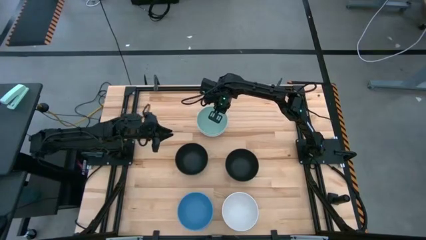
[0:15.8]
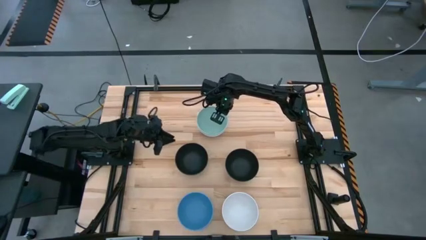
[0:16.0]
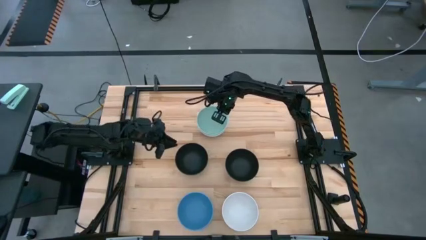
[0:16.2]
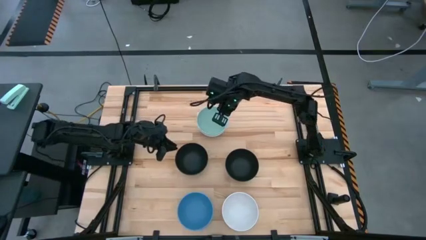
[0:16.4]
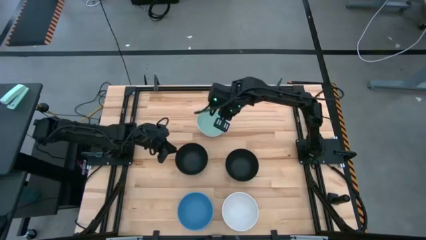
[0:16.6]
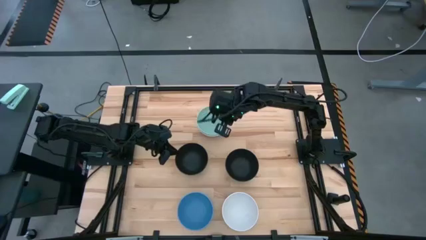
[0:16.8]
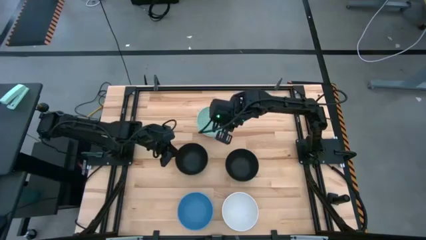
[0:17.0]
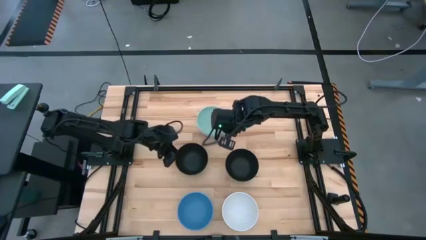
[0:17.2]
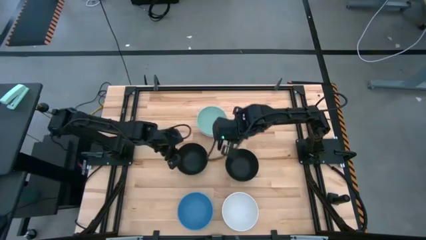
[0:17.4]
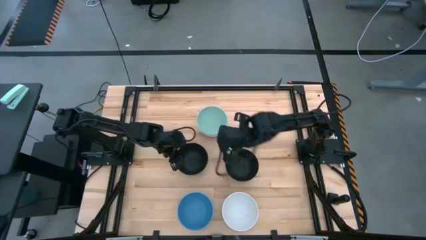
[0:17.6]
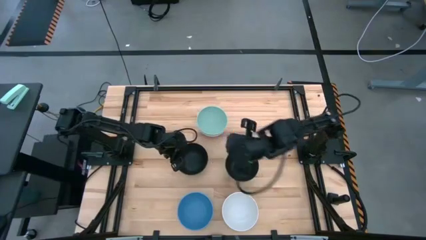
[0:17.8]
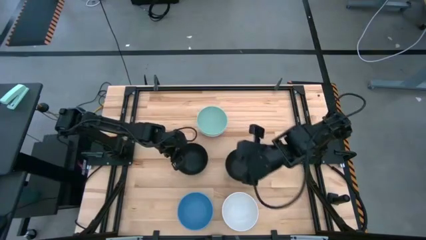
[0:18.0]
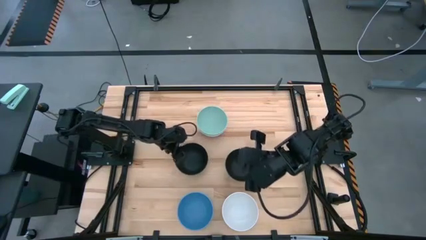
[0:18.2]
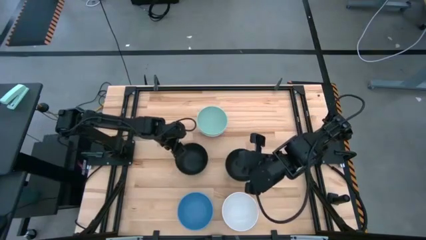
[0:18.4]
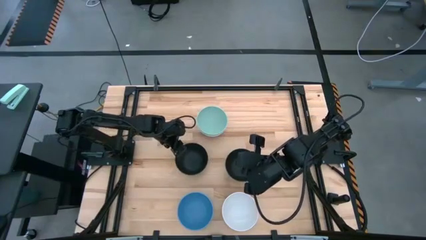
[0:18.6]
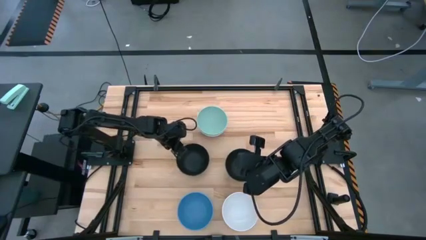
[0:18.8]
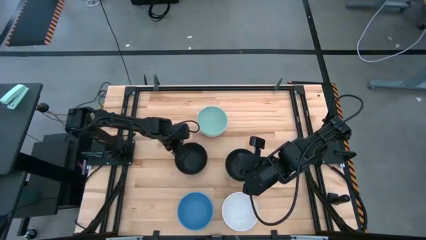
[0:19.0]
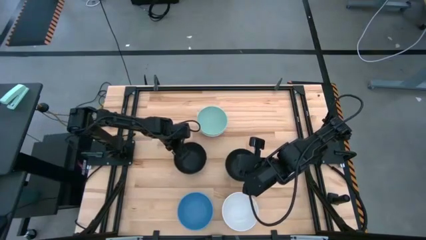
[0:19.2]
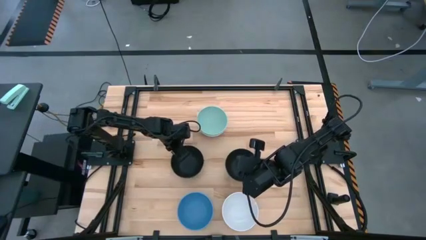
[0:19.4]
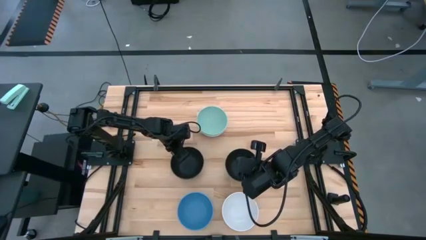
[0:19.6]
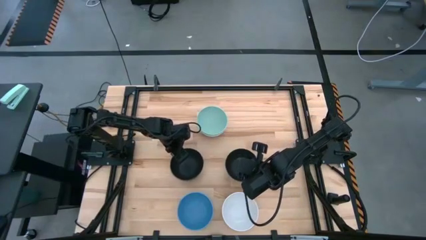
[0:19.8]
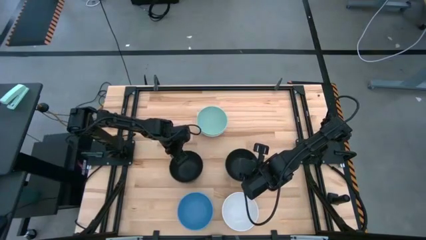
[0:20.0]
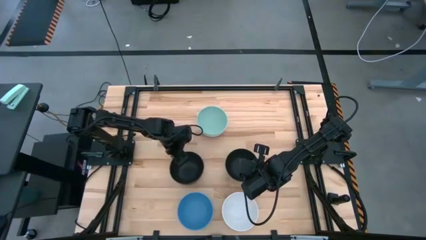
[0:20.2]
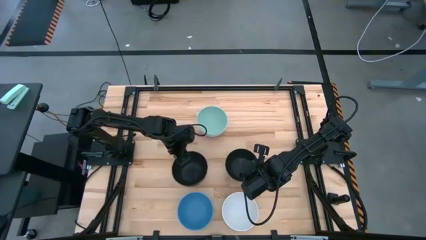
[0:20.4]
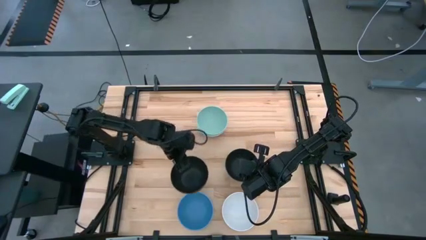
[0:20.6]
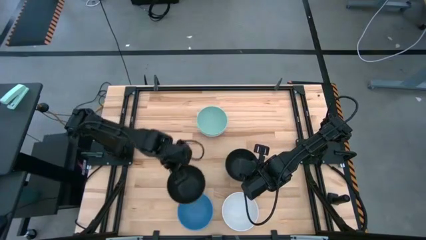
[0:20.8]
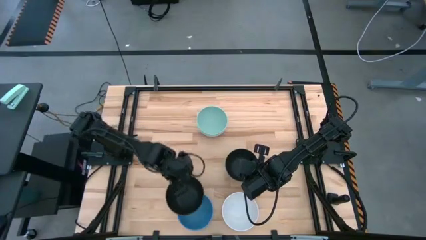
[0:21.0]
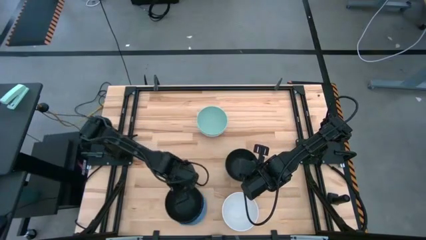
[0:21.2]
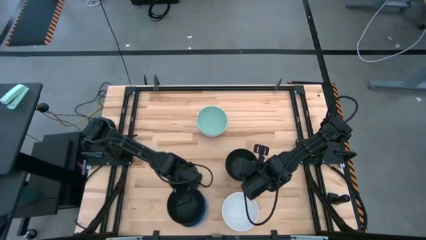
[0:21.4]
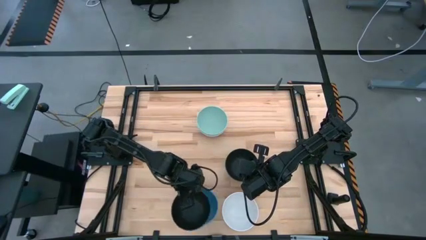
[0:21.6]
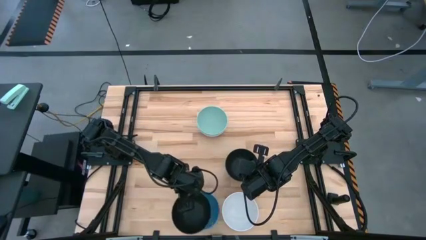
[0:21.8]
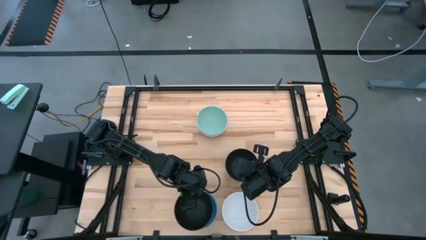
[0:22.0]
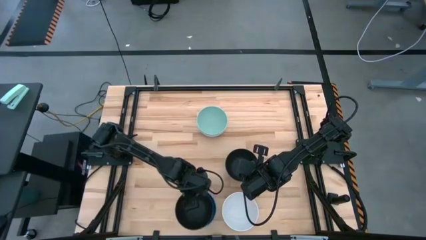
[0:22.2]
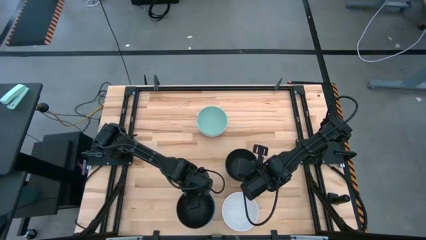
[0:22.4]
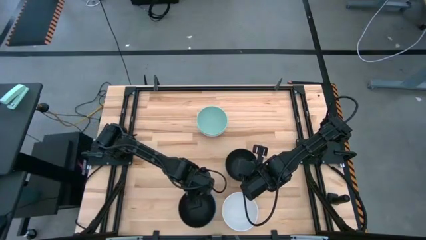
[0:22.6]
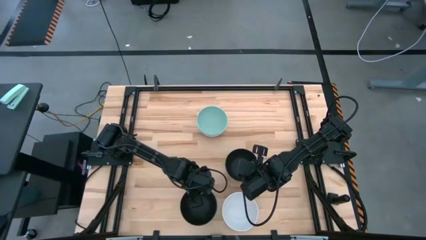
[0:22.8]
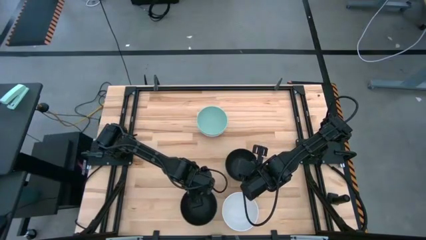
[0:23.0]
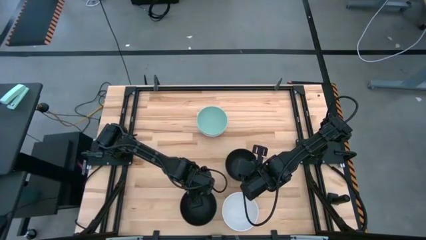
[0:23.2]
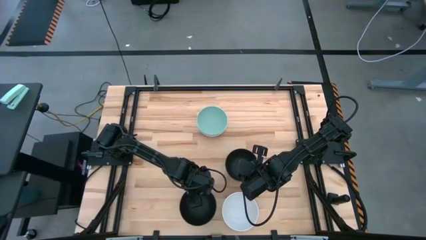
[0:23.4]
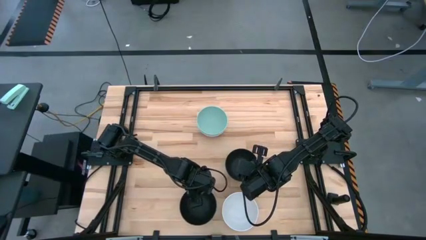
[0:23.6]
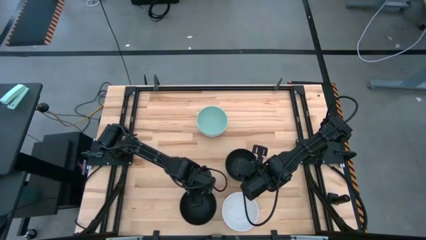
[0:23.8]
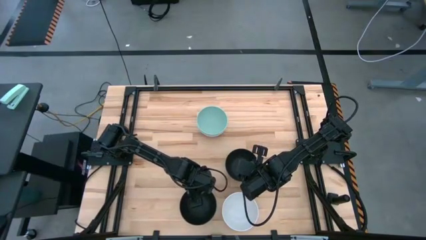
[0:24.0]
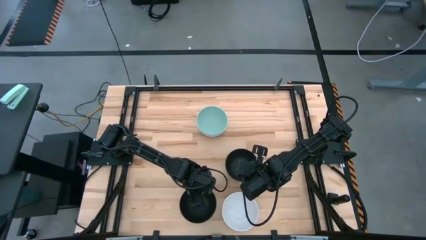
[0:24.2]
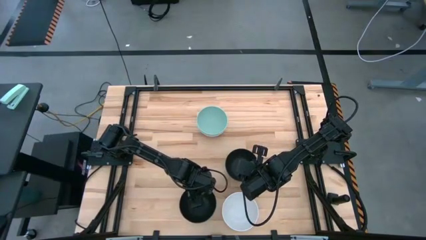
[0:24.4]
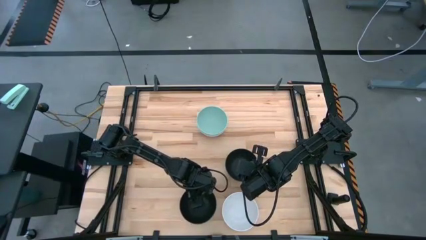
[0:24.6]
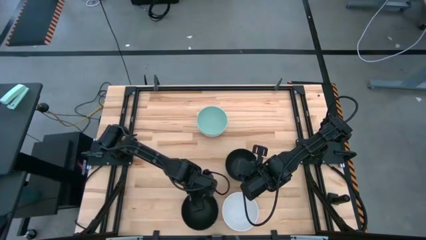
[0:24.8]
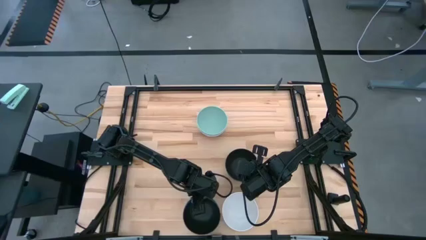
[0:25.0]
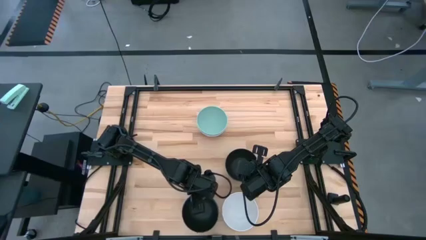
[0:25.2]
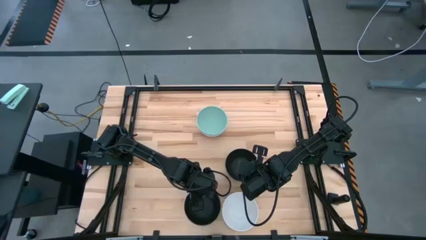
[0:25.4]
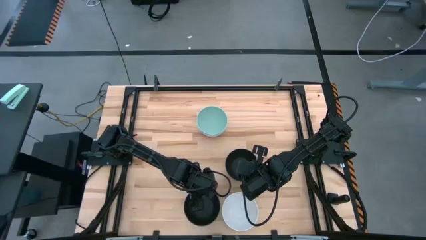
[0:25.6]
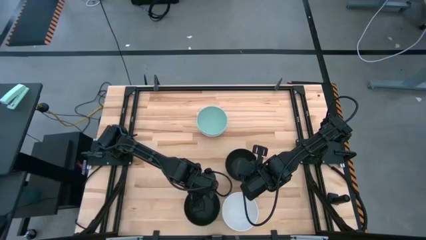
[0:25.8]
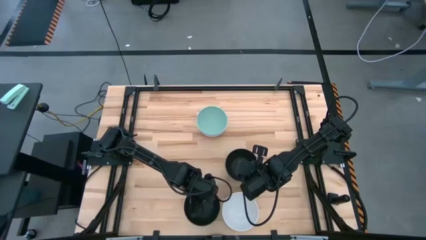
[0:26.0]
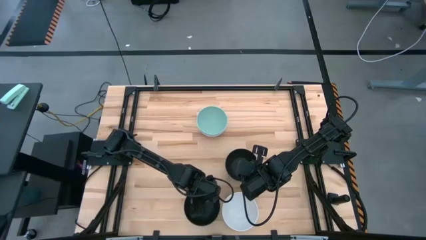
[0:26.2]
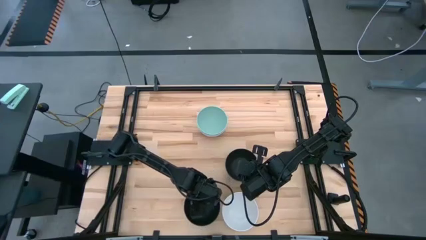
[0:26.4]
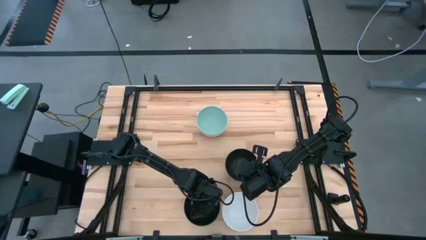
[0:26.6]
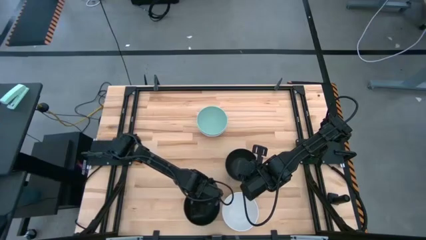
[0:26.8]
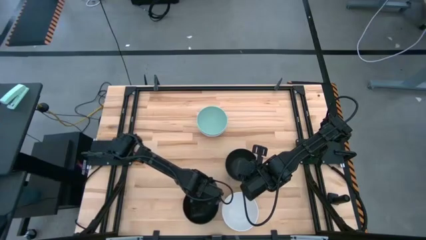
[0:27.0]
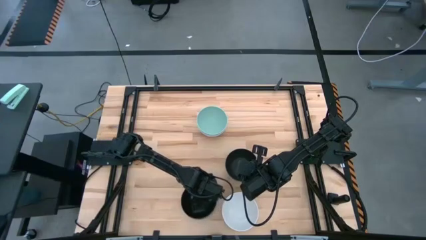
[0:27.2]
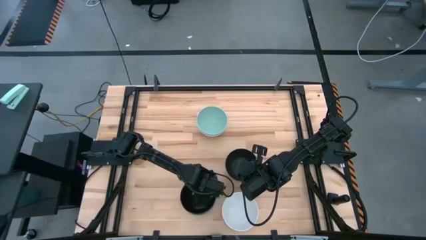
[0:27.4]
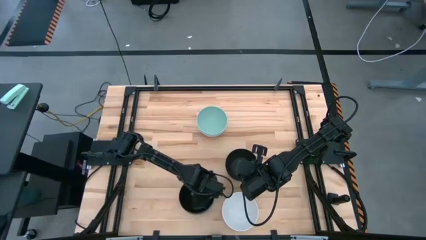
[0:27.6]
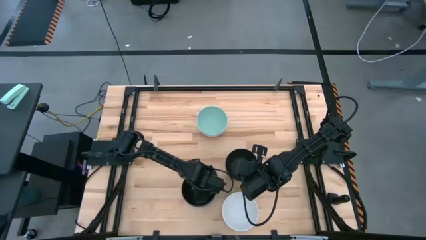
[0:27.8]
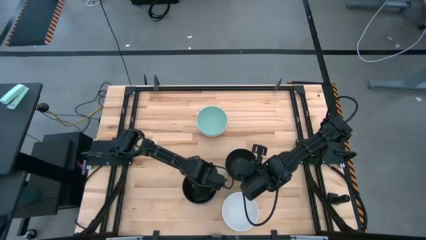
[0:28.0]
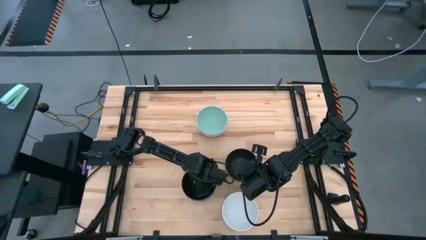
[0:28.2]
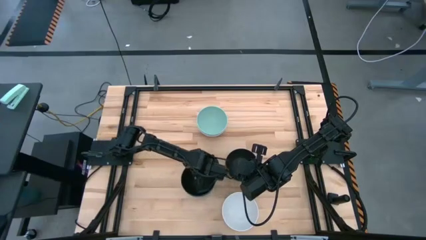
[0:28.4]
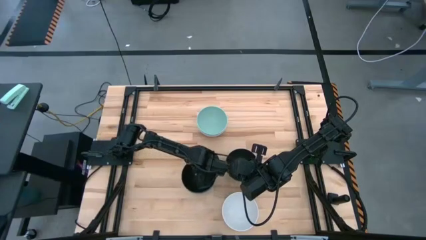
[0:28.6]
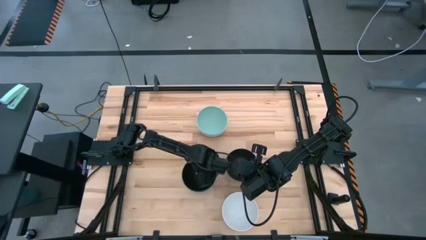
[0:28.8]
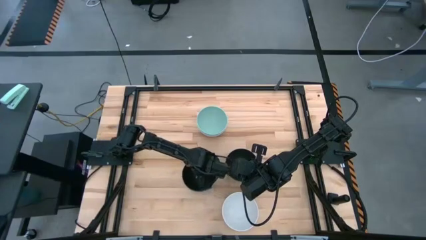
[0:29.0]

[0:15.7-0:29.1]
Task: Nest bowls inside each other
Stack the left black bowl on top of the blue bowl
